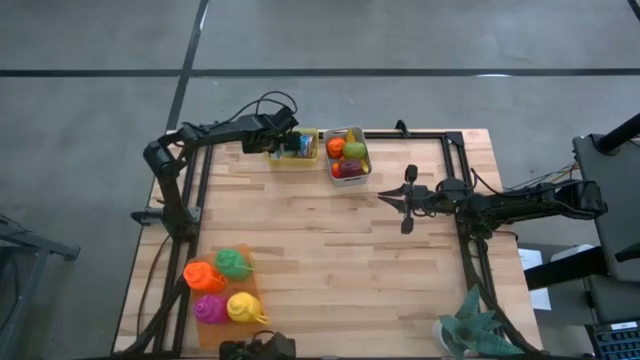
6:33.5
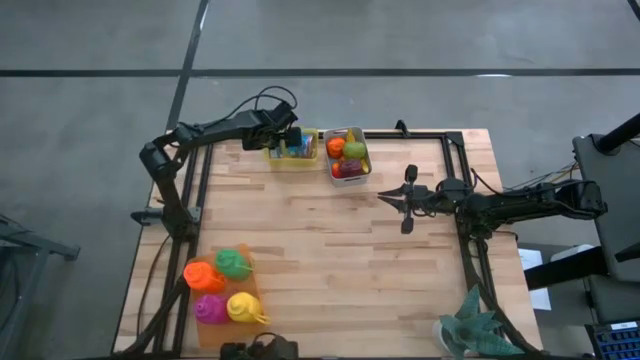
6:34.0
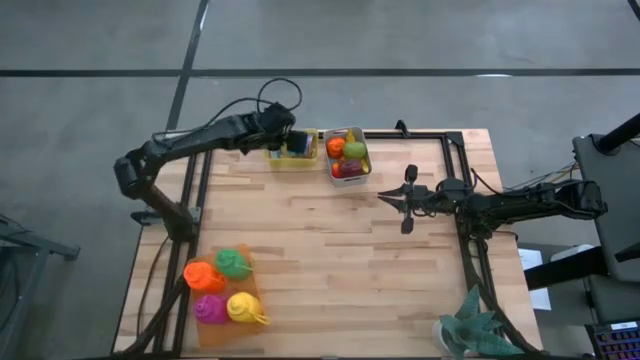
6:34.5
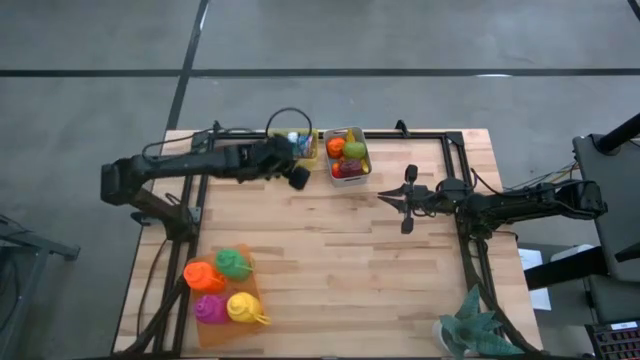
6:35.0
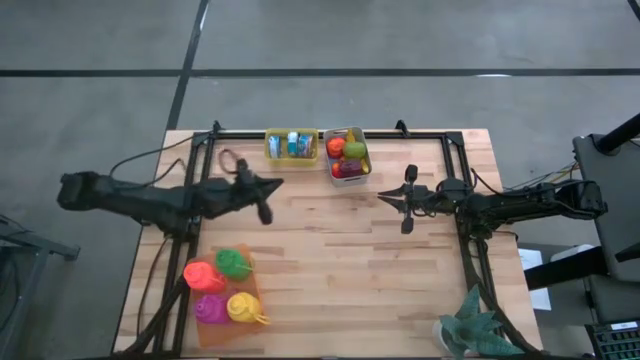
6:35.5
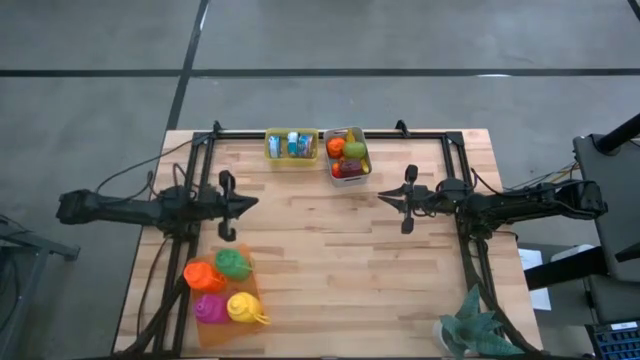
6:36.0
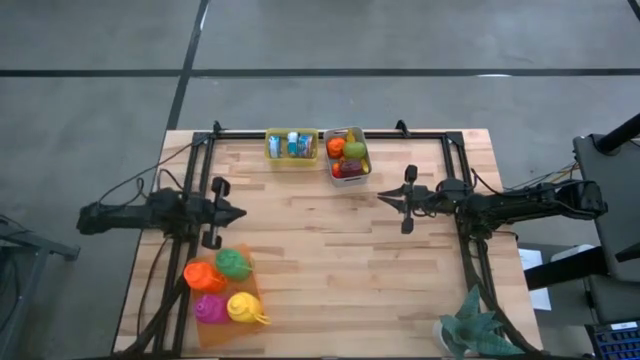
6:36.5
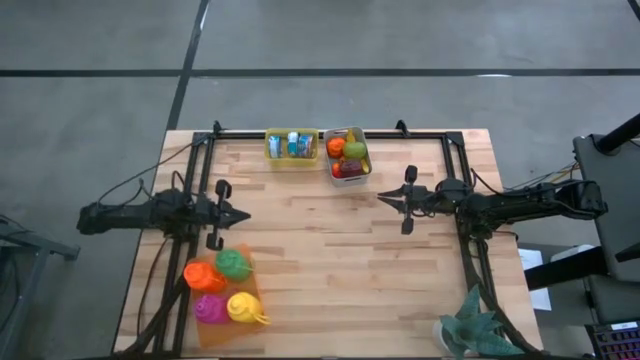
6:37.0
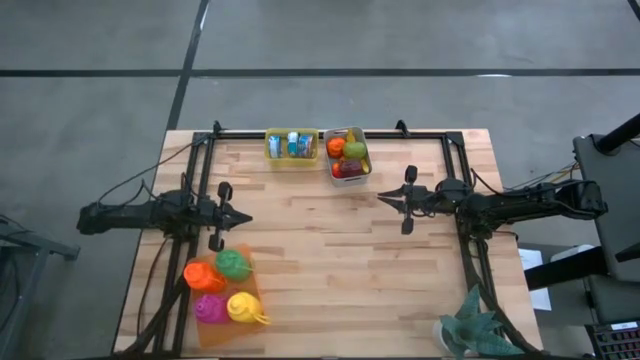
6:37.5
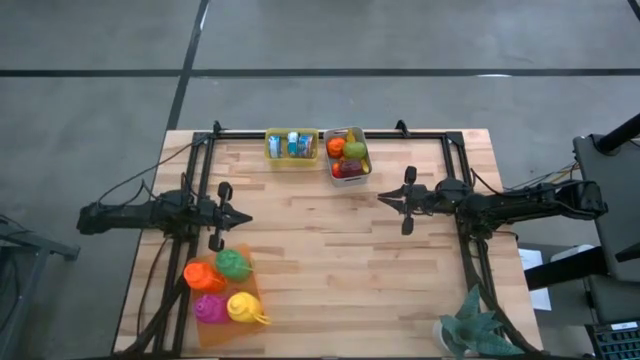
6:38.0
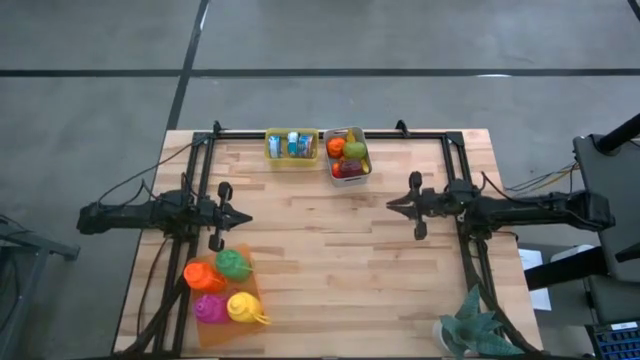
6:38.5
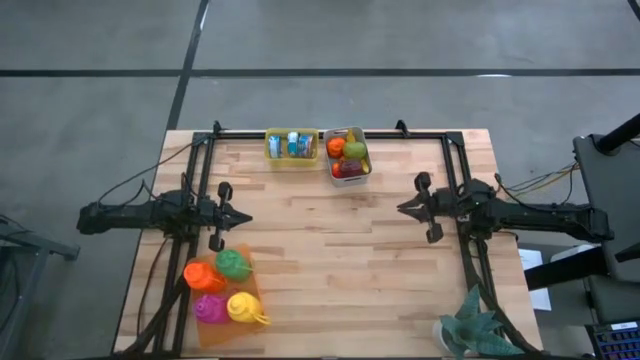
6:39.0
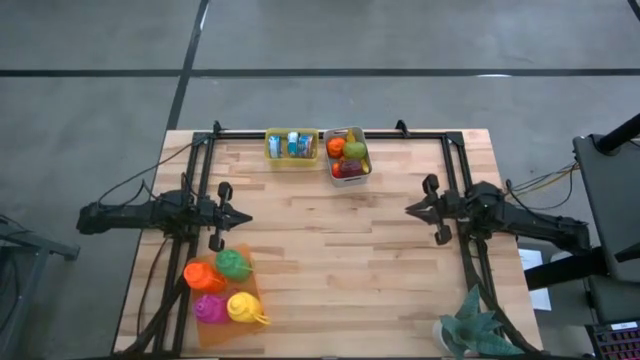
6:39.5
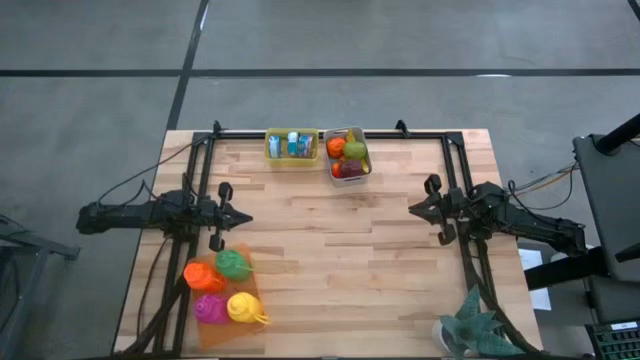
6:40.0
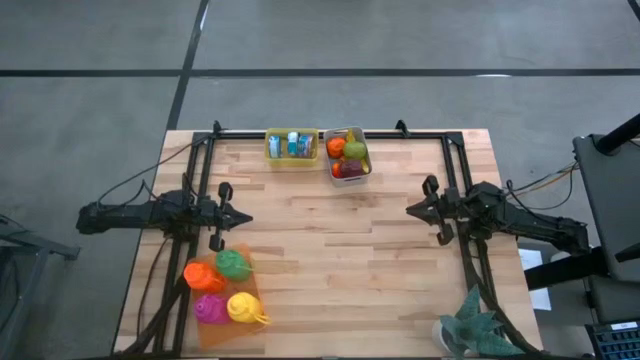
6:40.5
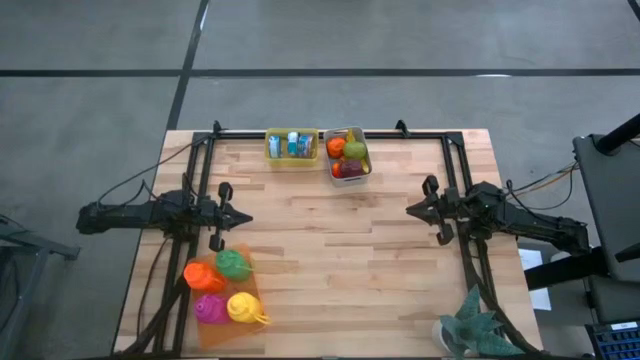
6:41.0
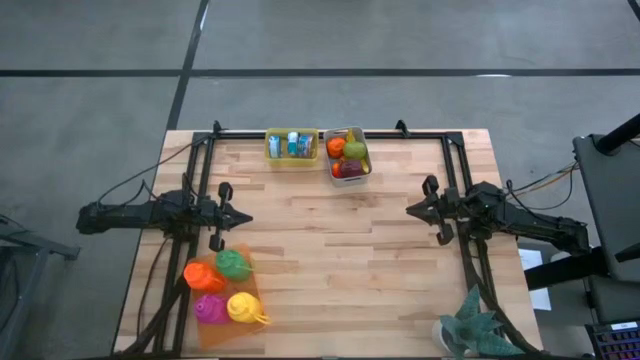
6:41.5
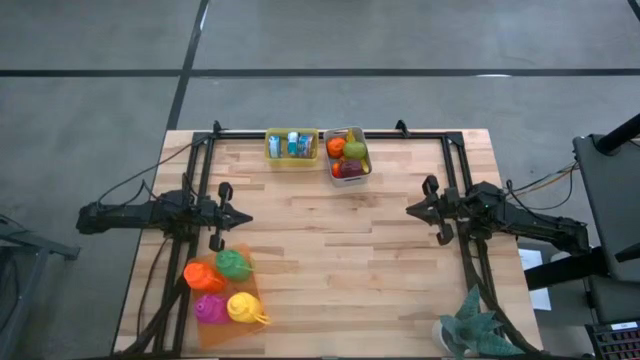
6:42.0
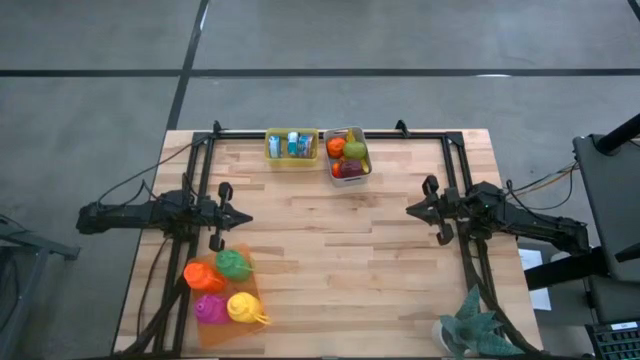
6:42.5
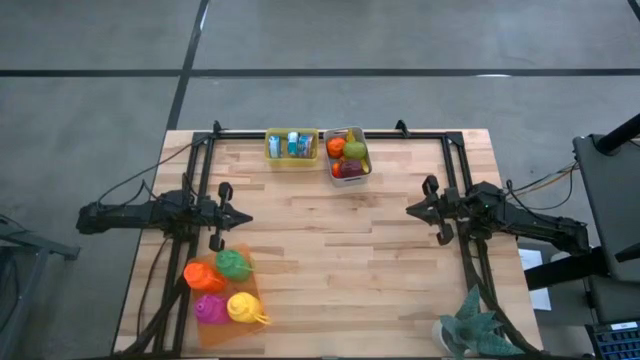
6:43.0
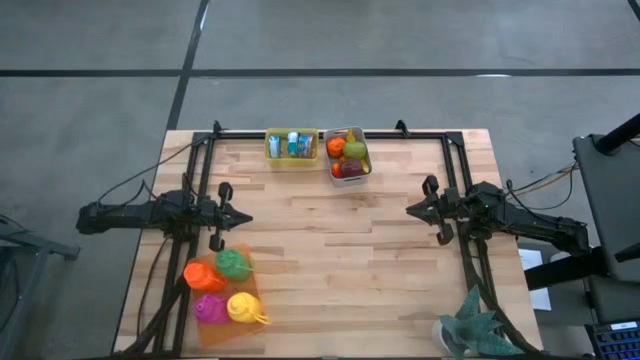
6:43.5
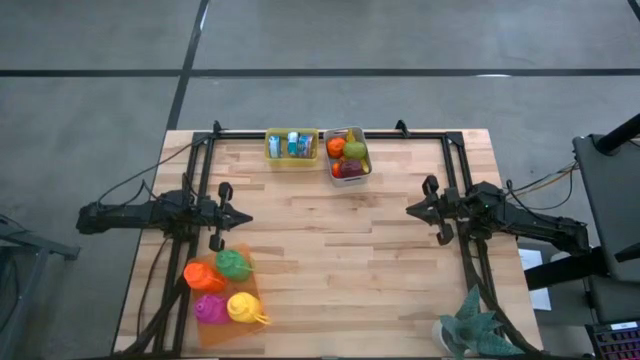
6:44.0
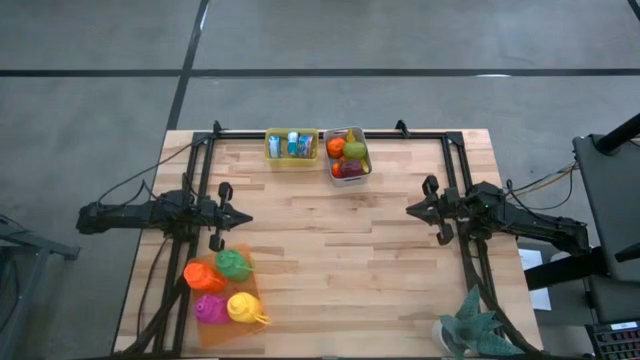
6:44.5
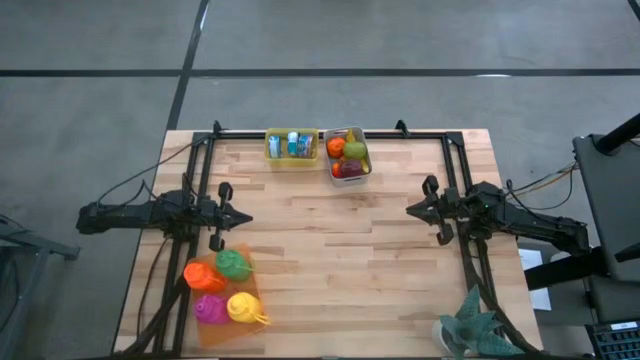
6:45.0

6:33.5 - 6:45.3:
Task: Pick & Place Food Item
Return to Home Position

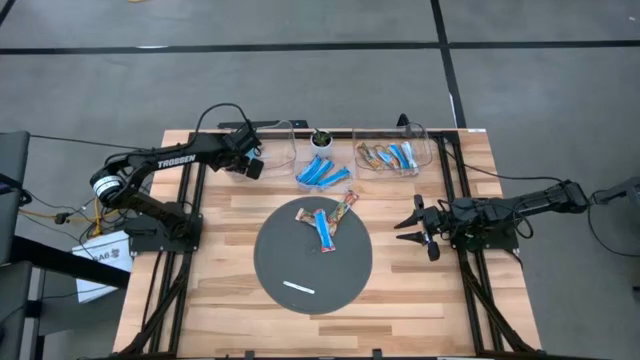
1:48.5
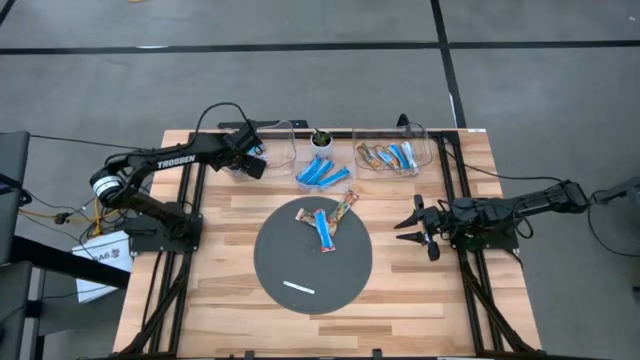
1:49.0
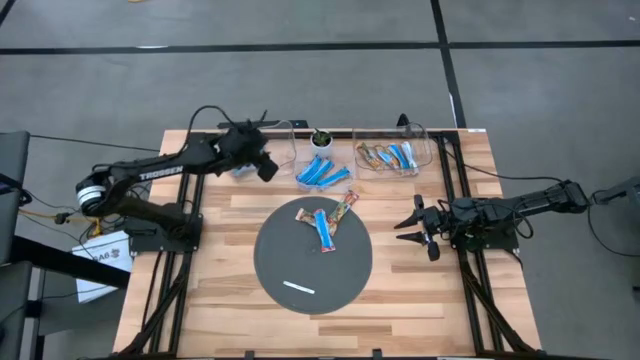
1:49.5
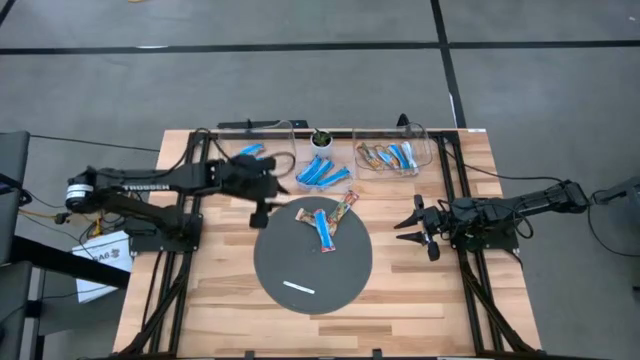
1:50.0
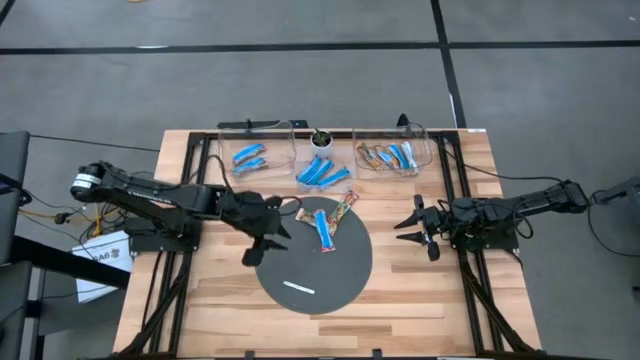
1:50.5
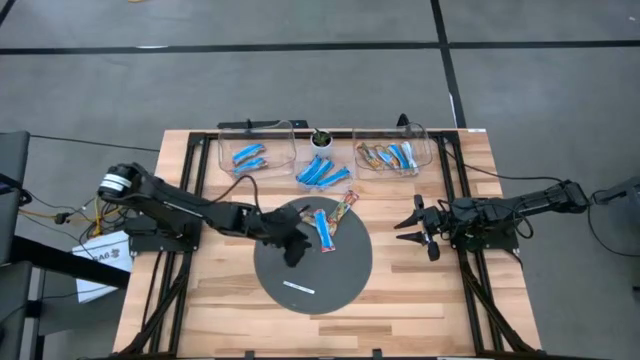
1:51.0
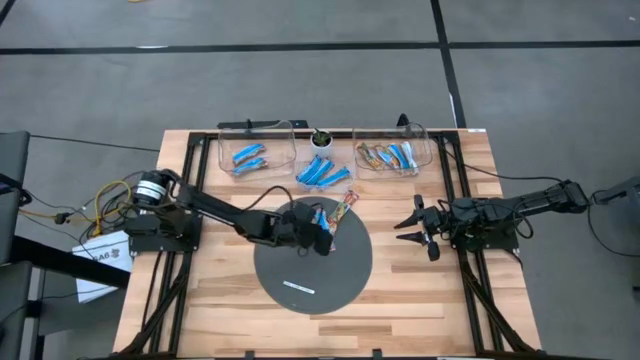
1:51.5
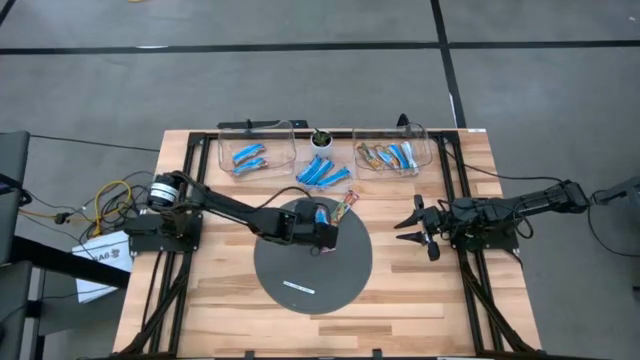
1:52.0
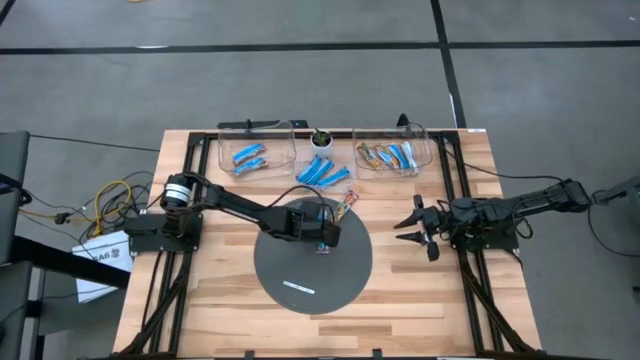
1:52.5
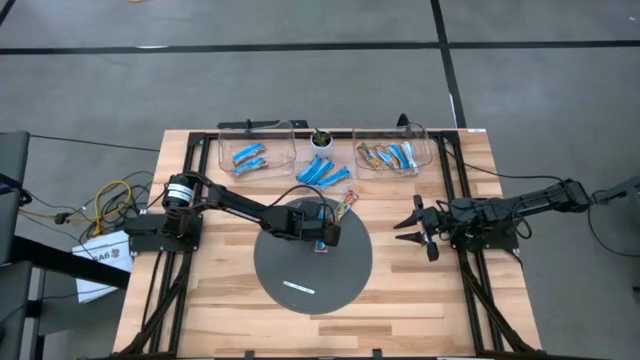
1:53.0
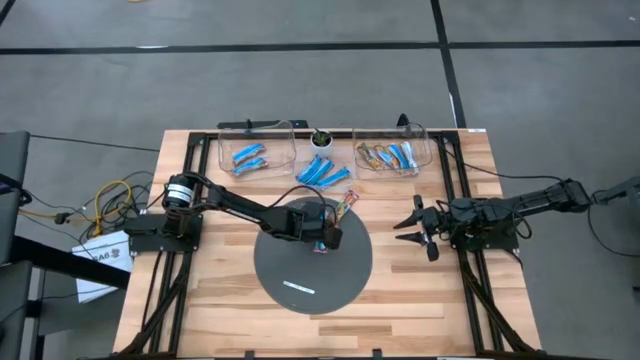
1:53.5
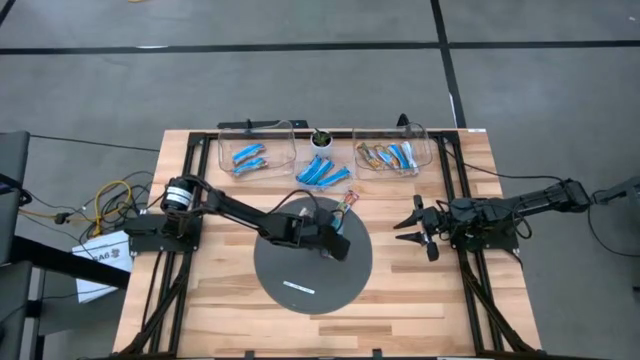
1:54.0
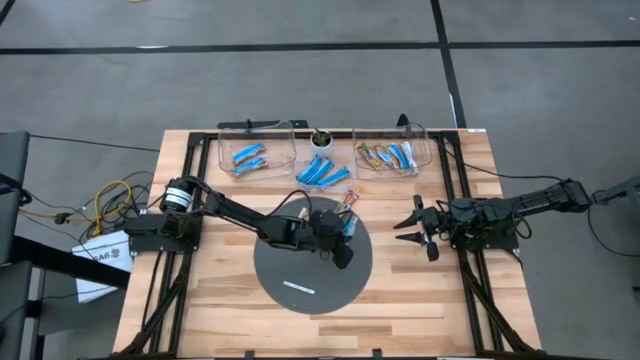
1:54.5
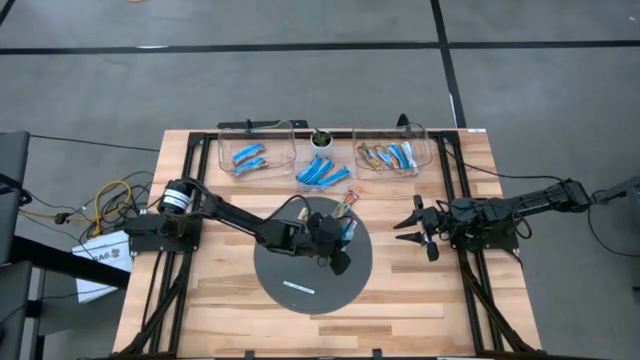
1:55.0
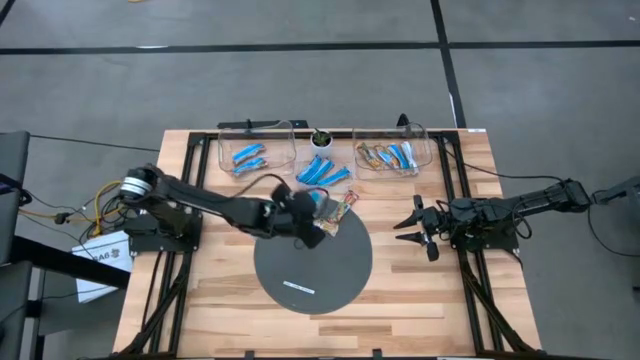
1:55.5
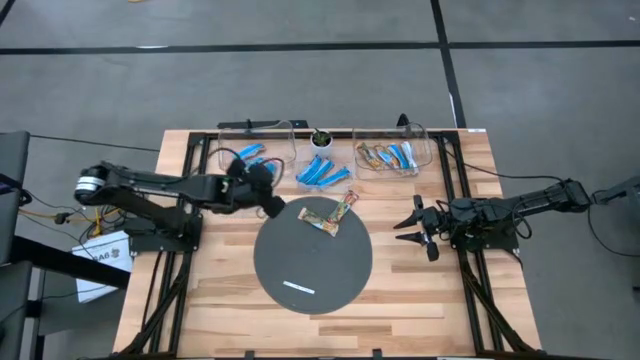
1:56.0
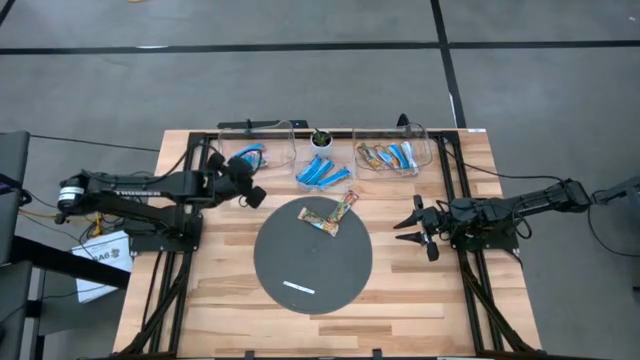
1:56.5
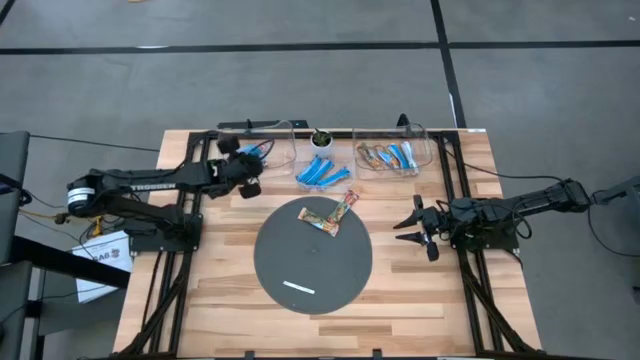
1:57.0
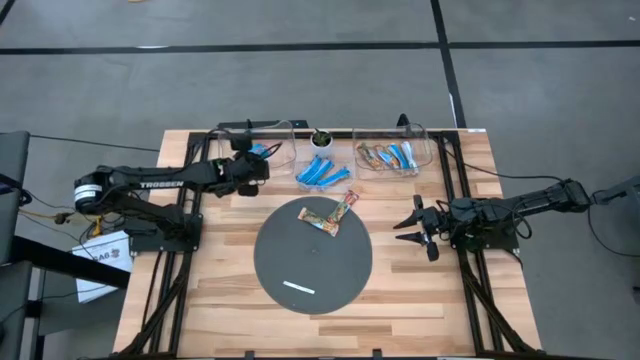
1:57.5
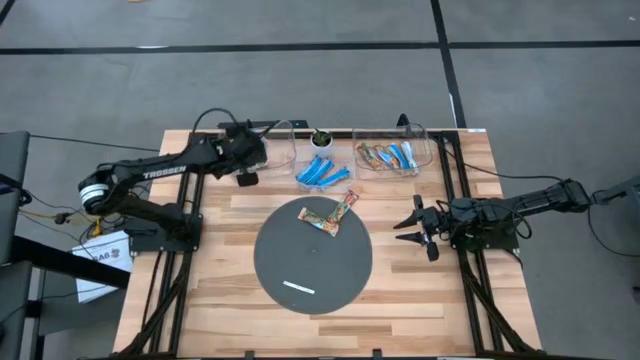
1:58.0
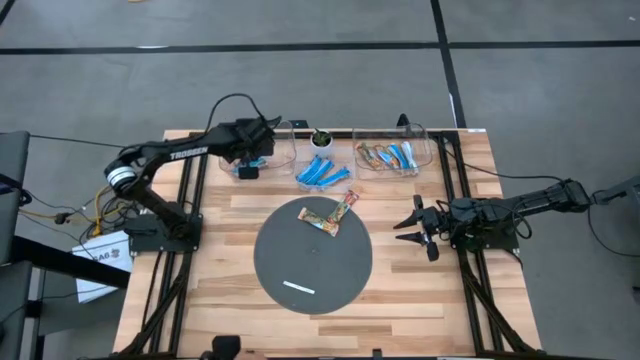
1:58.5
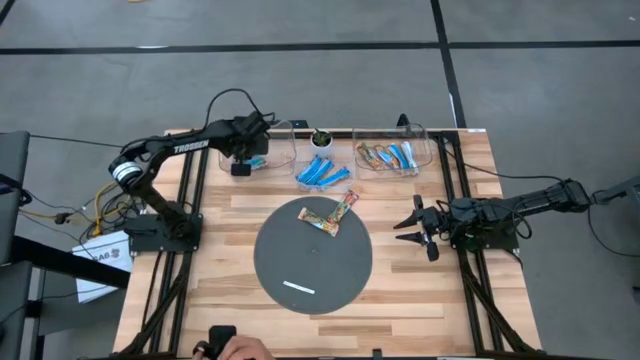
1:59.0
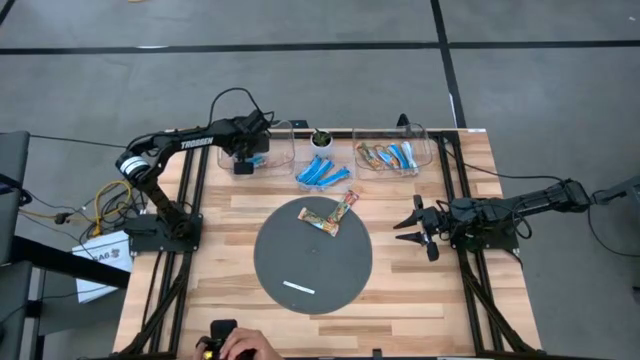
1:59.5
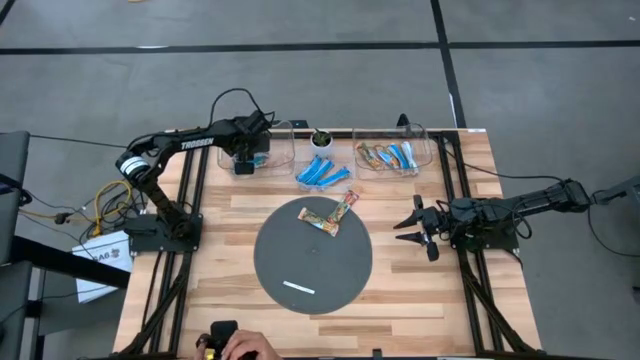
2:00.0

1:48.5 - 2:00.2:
Task: Pick and place Granola Bars by type
Put the red granola bar into the left transparent bin
